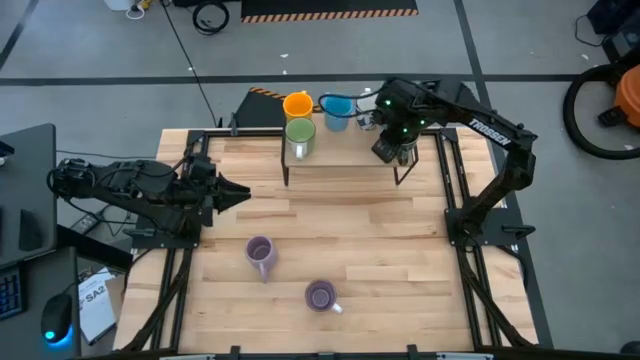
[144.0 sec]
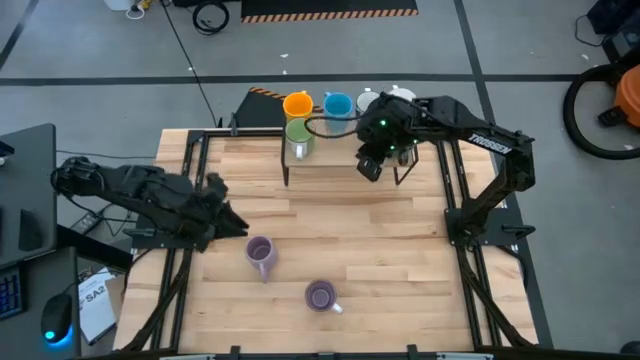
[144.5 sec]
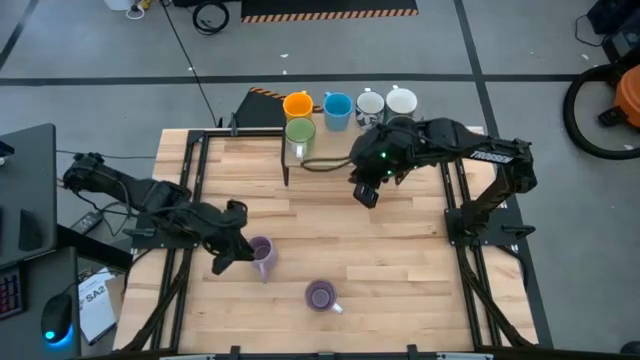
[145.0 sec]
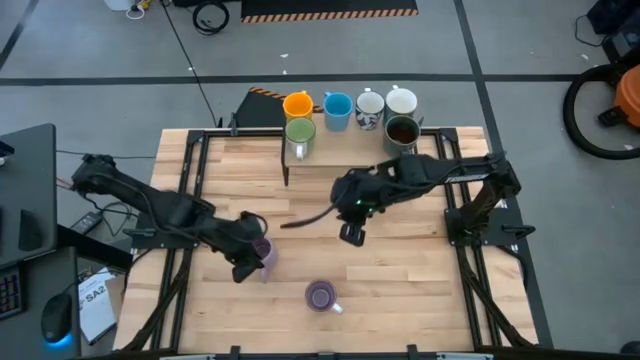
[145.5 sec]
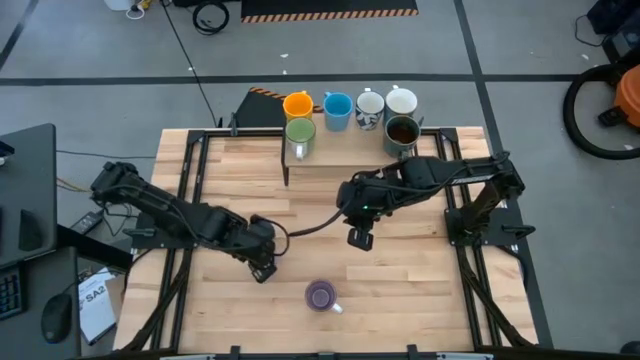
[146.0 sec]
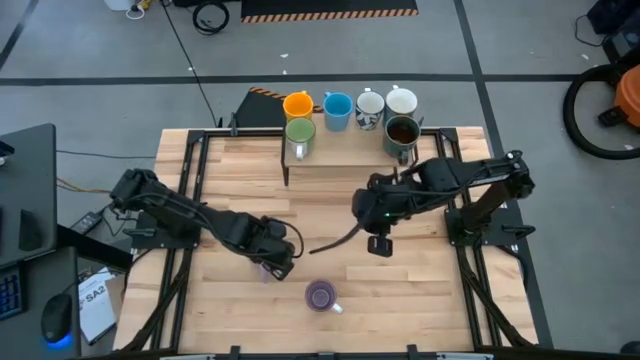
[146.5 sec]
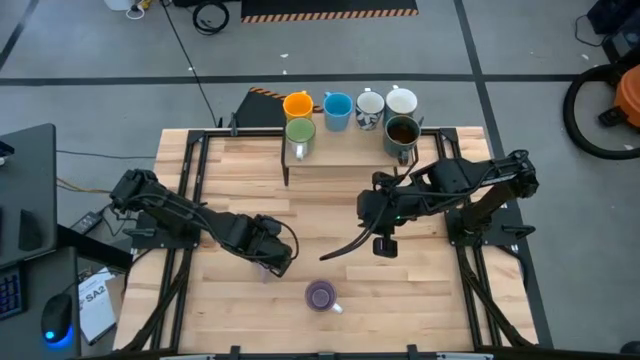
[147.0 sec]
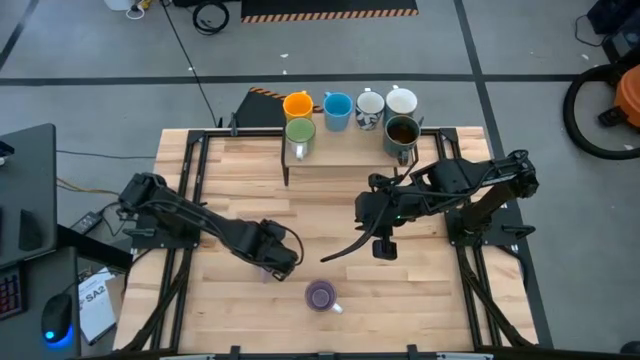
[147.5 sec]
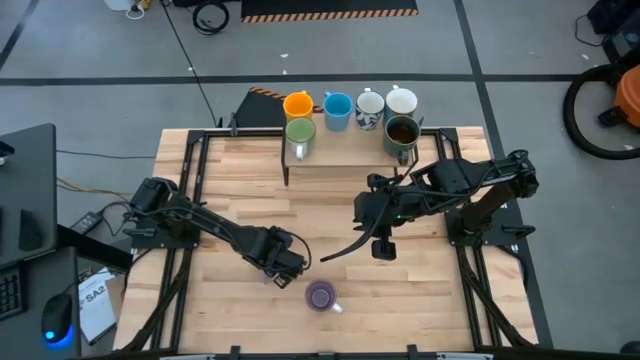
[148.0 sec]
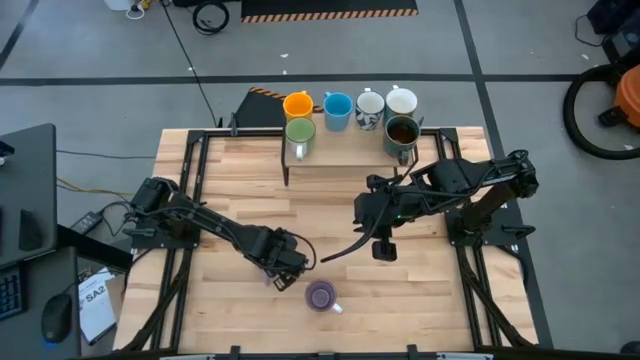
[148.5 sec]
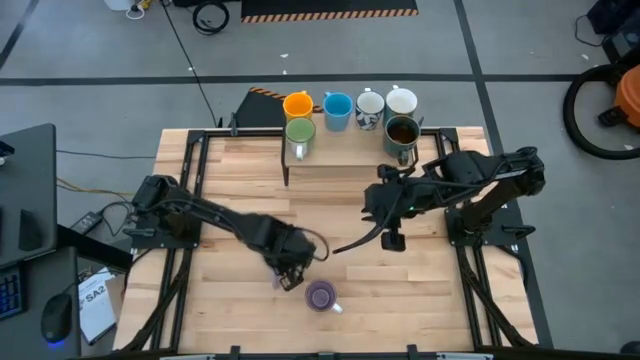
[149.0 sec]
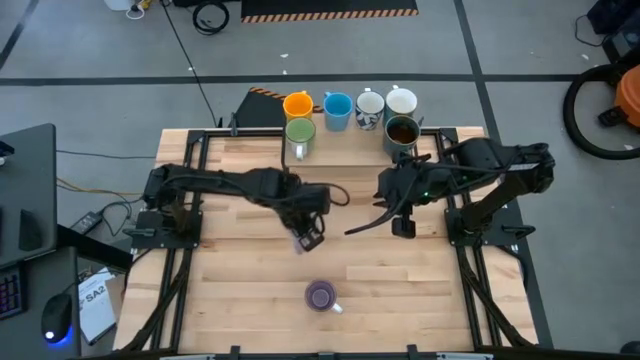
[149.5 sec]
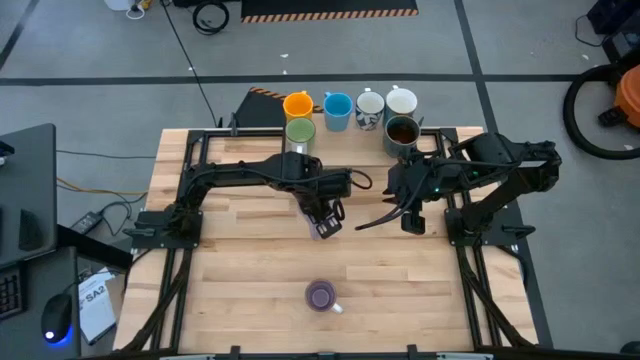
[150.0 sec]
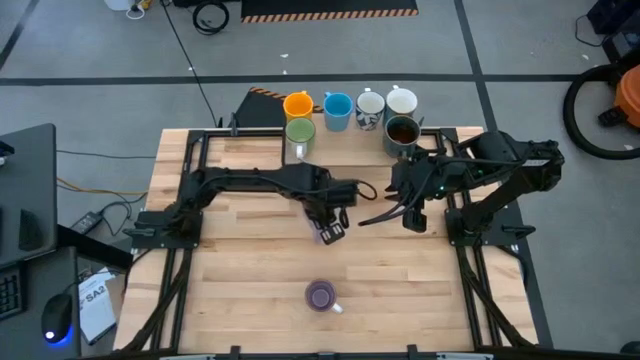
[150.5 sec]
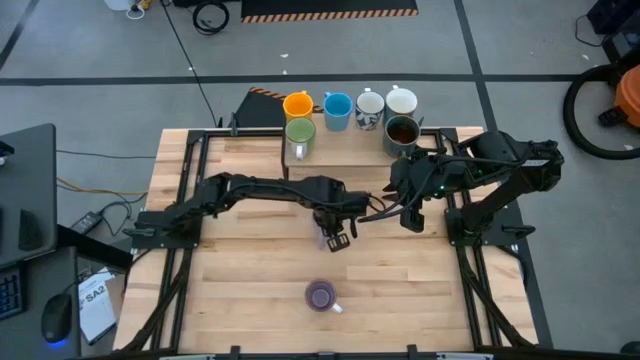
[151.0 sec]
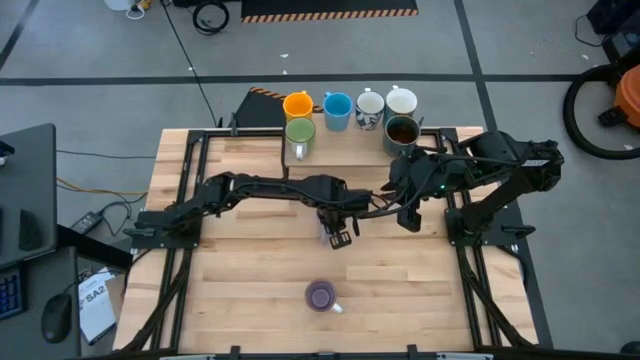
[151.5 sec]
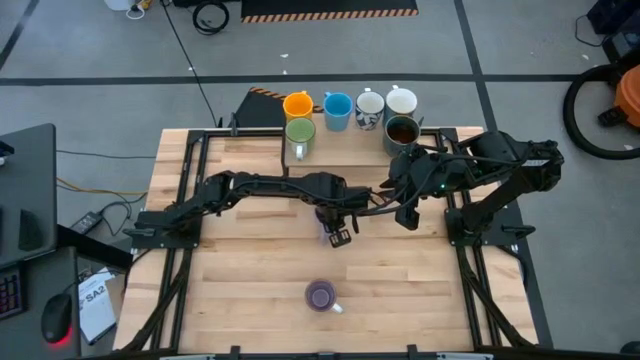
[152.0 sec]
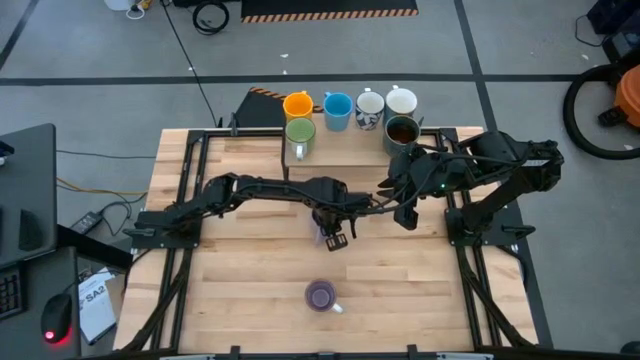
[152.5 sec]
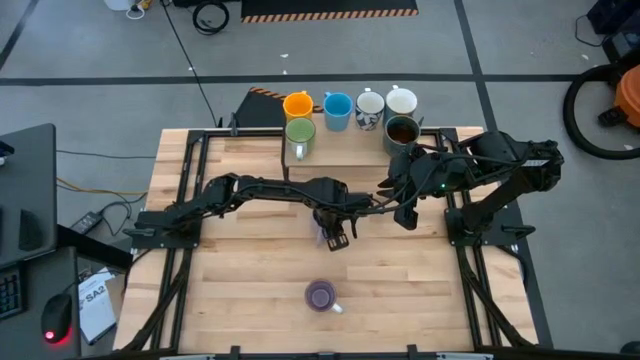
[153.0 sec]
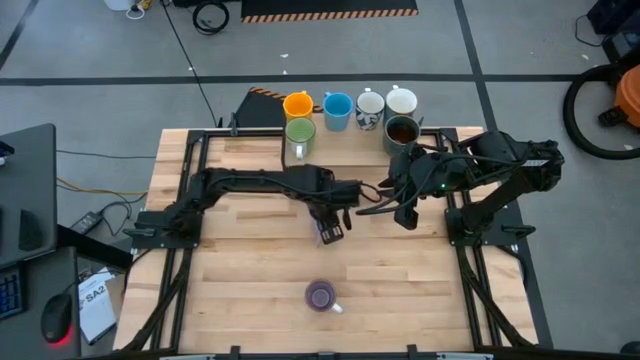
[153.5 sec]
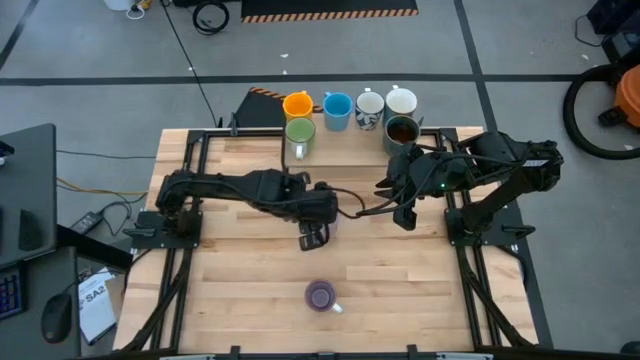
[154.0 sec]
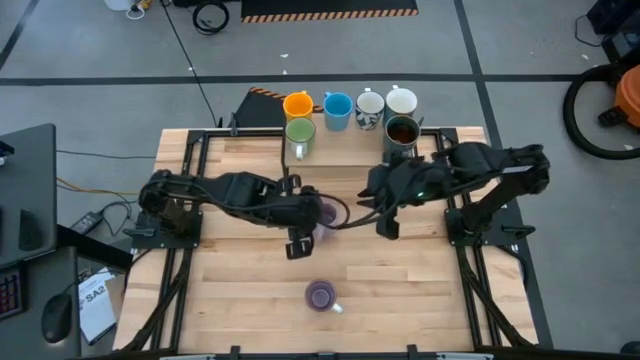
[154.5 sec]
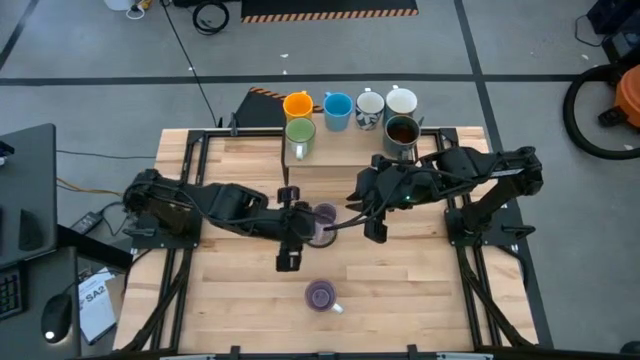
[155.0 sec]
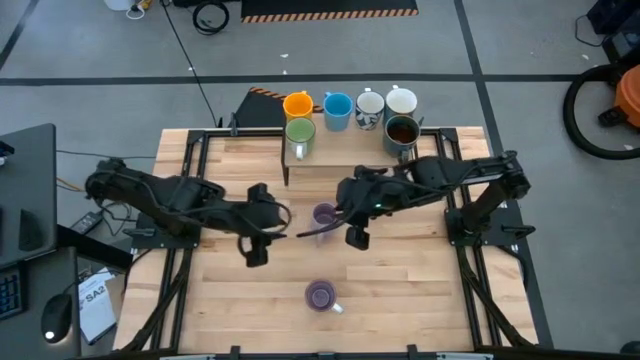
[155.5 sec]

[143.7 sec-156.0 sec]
Task: Place coffee mugs
Put the purple mug on the shelf

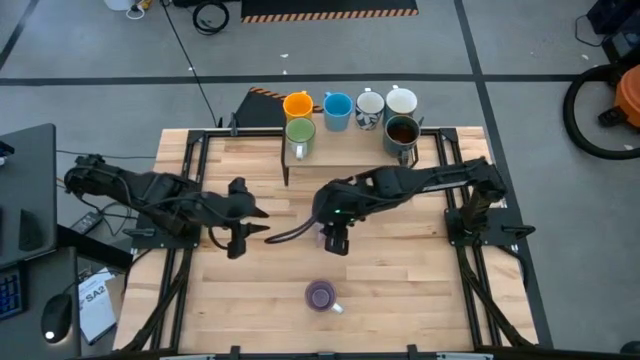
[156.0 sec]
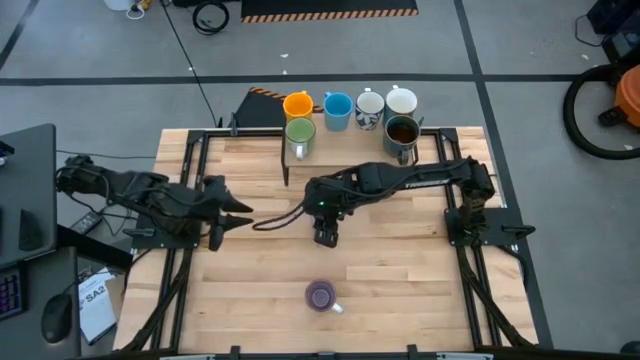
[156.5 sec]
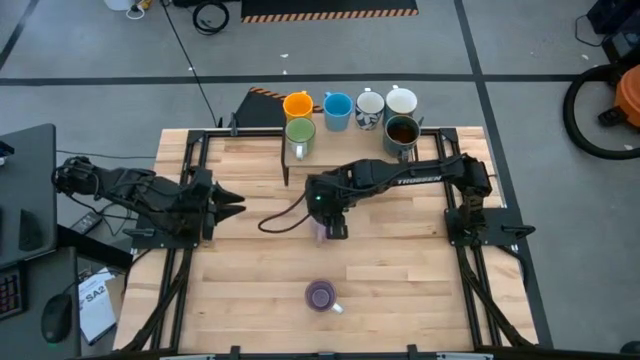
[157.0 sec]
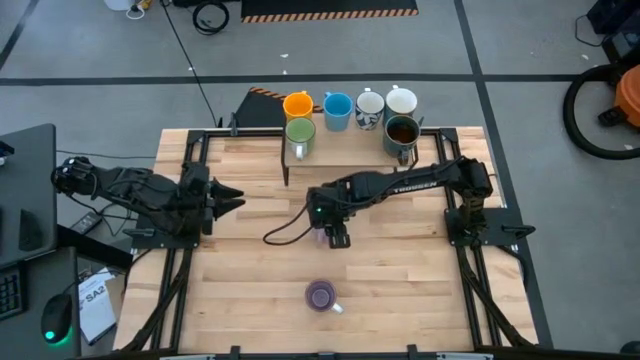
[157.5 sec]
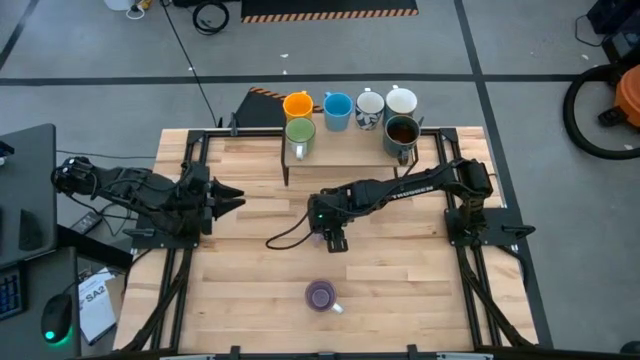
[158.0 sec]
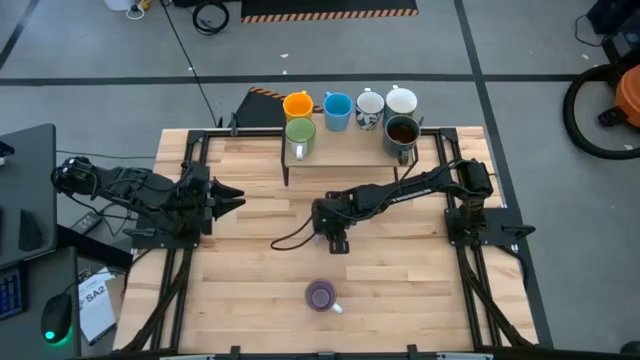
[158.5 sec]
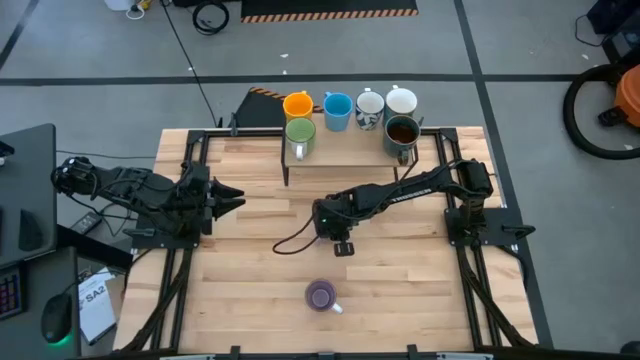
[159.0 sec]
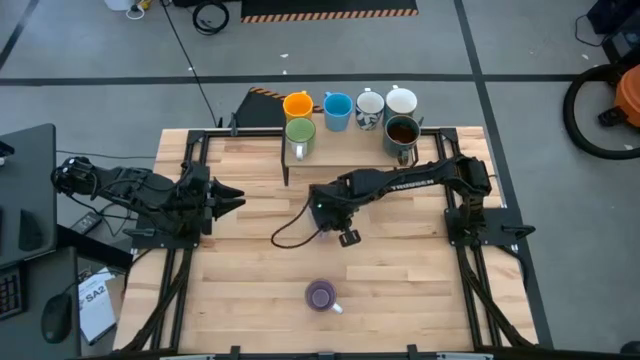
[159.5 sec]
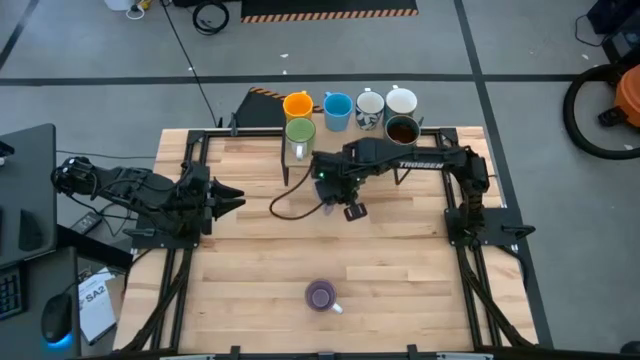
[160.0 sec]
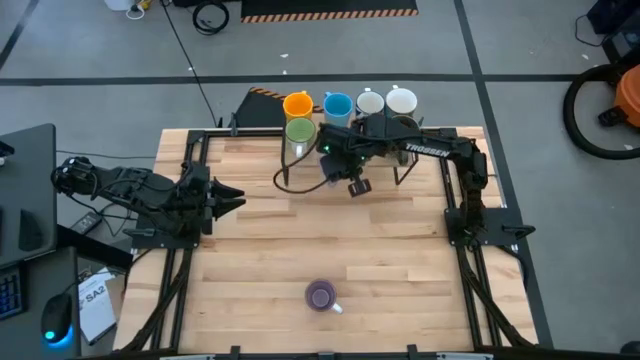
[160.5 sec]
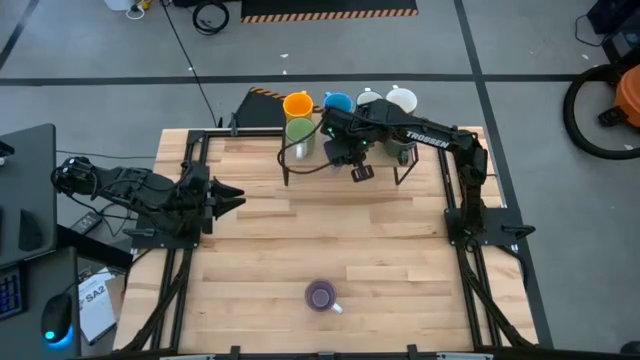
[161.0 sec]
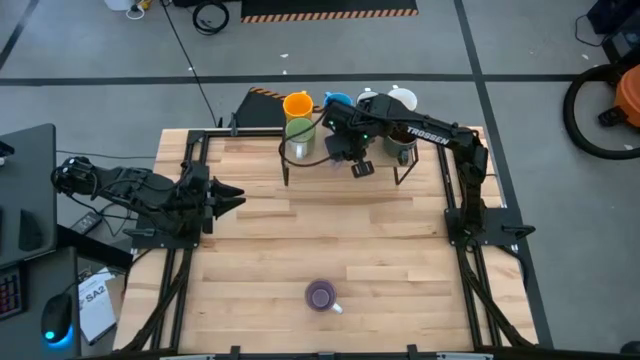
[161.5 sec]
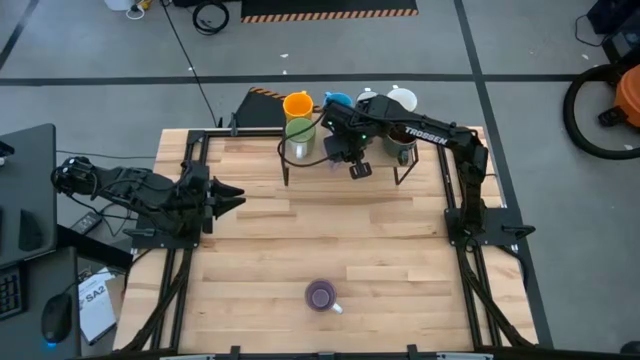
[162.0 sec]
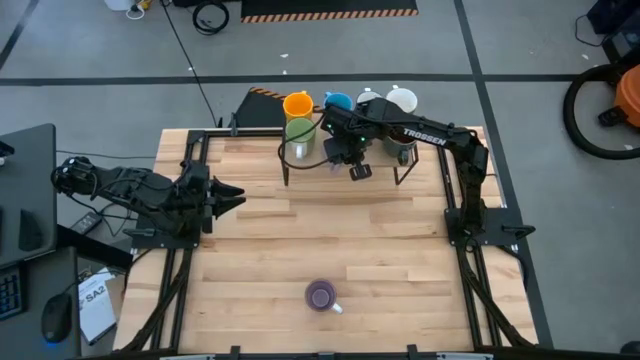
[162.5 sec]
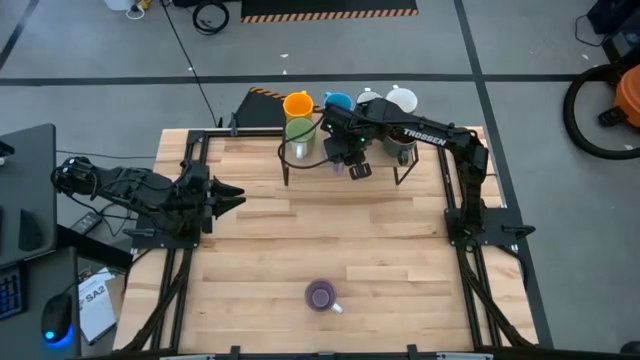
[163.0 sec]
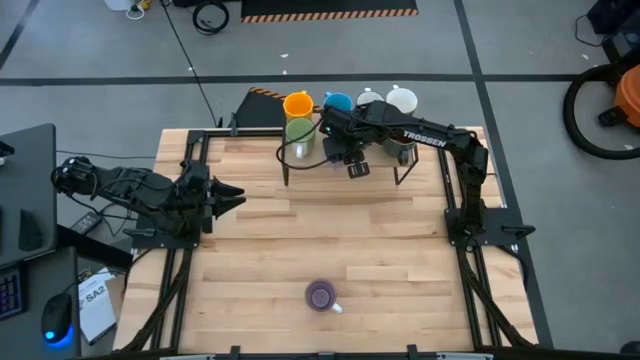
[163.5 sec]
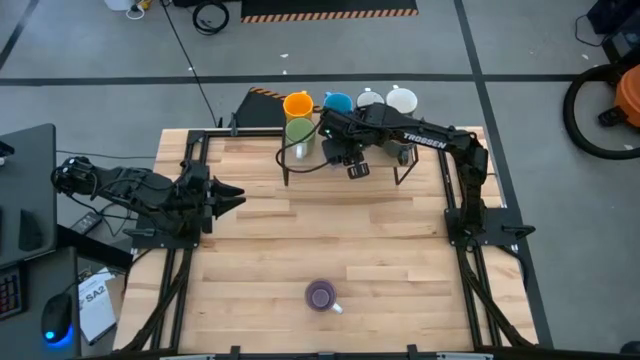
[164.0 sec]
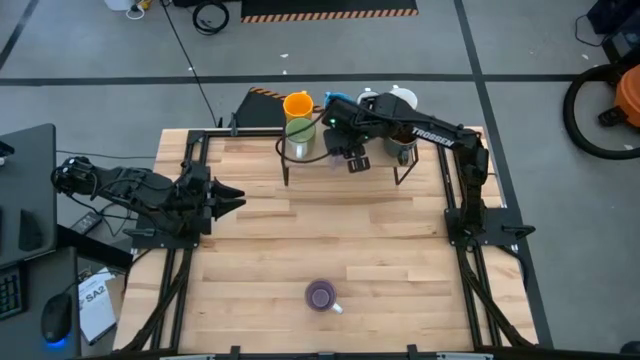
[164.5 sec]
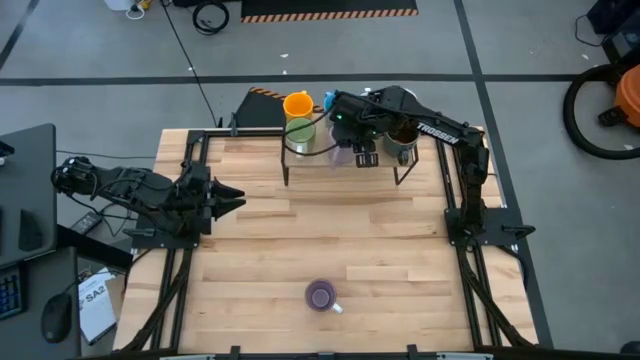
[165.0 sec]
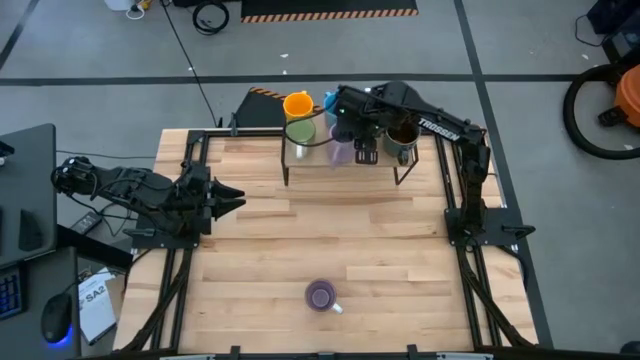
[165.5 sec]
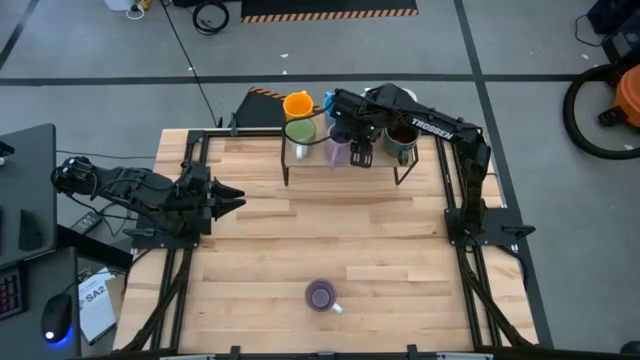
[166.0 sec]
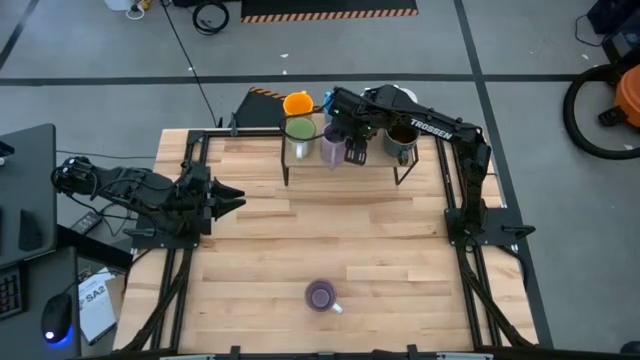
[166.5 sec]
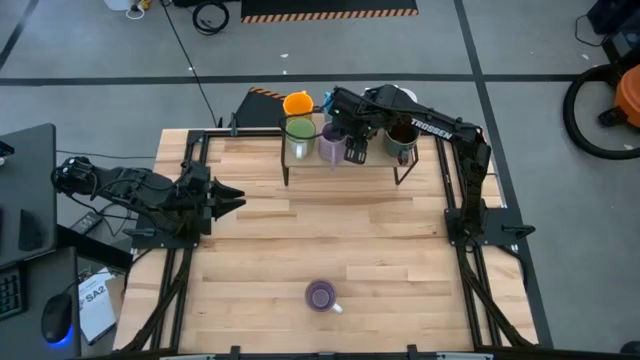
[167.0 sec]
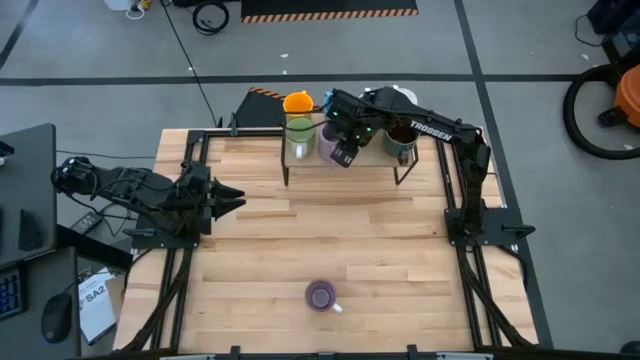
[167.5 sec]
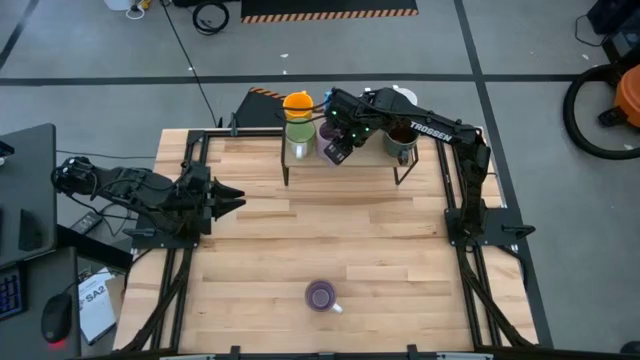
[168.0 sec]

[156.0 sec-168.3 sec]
Put the purple mug on the shelf
